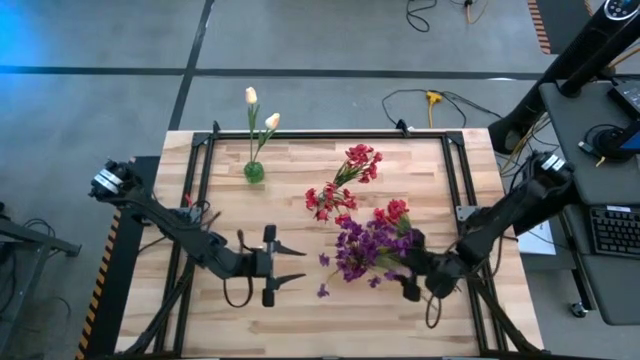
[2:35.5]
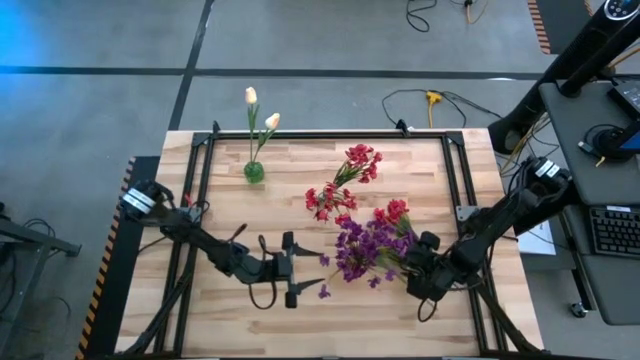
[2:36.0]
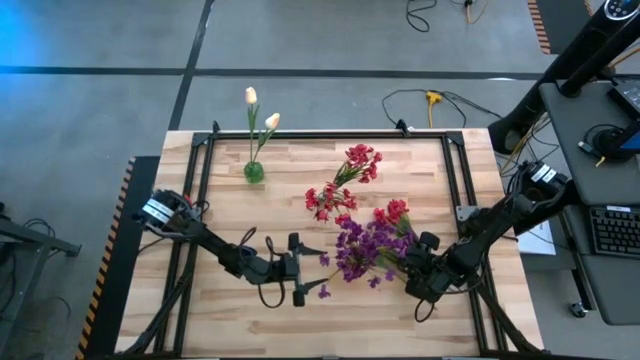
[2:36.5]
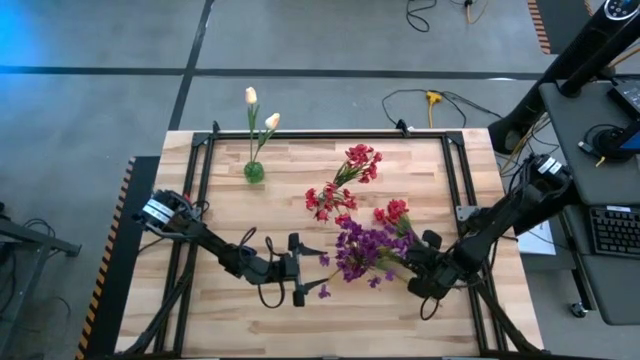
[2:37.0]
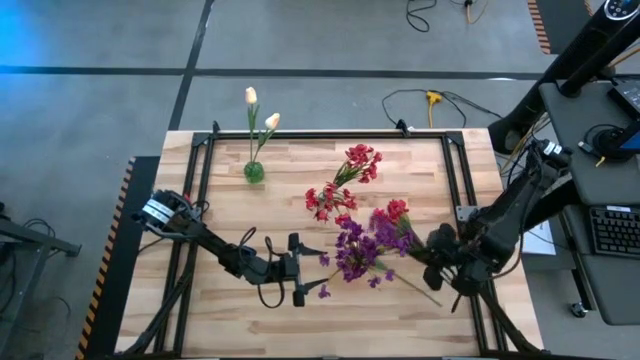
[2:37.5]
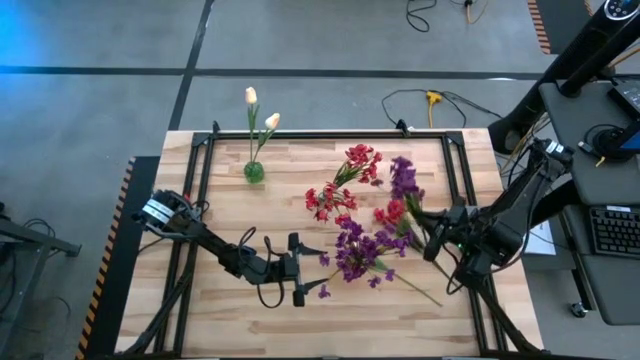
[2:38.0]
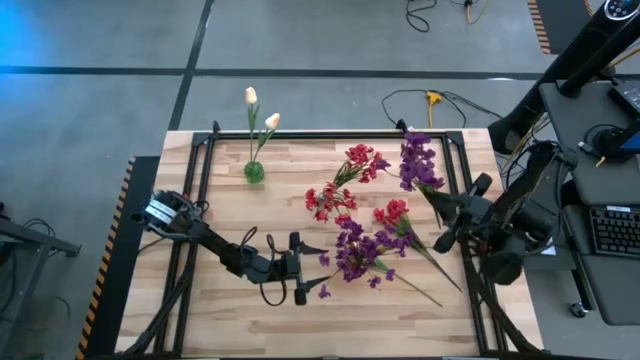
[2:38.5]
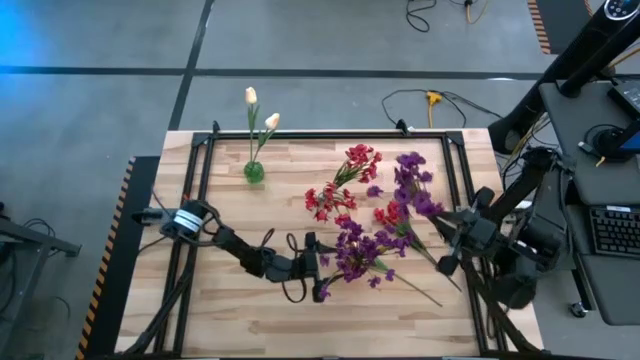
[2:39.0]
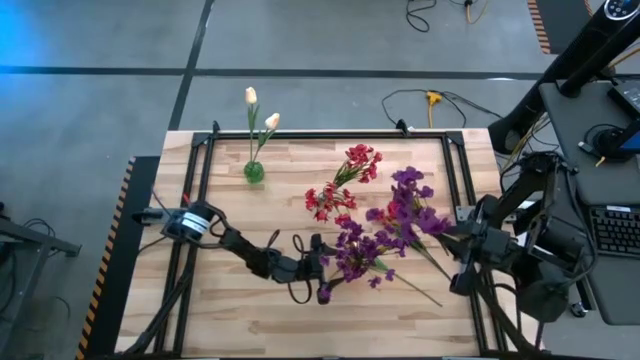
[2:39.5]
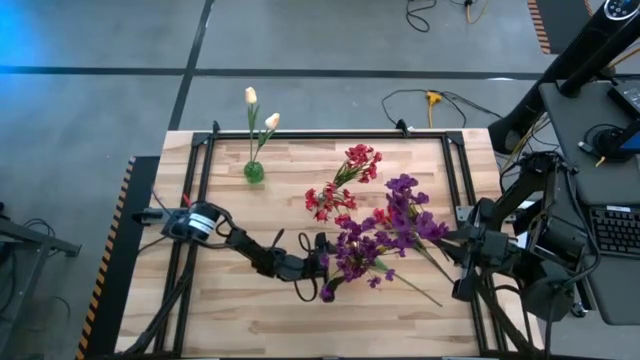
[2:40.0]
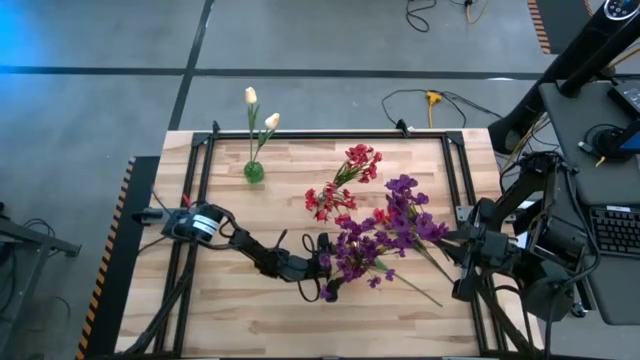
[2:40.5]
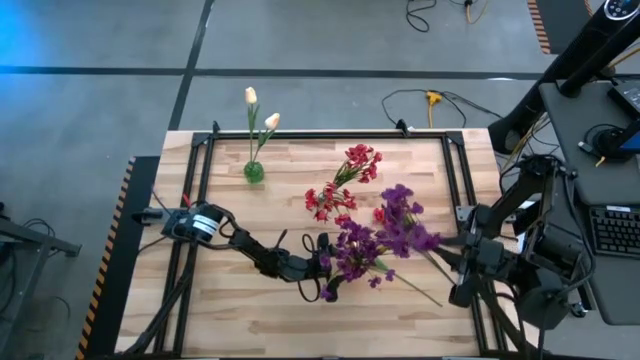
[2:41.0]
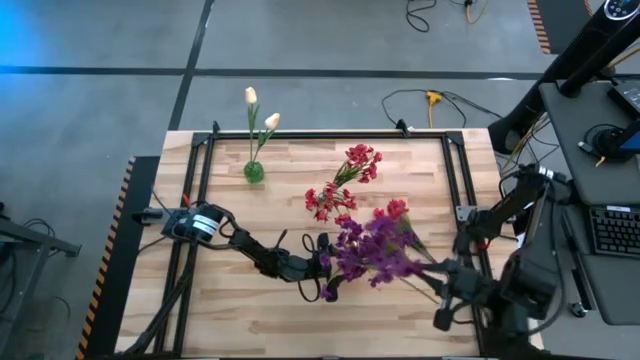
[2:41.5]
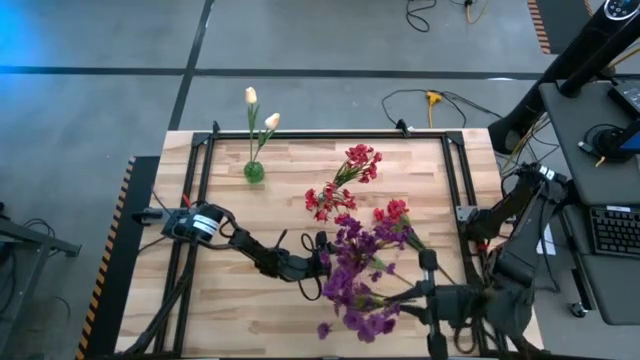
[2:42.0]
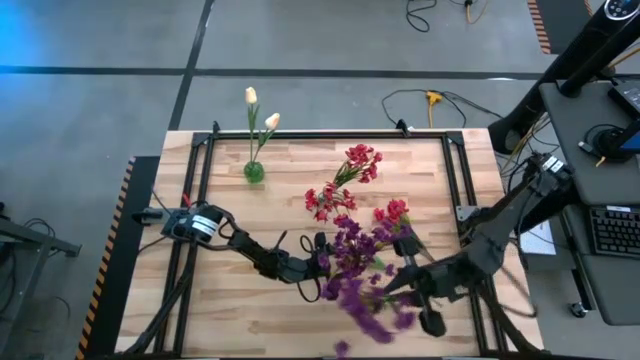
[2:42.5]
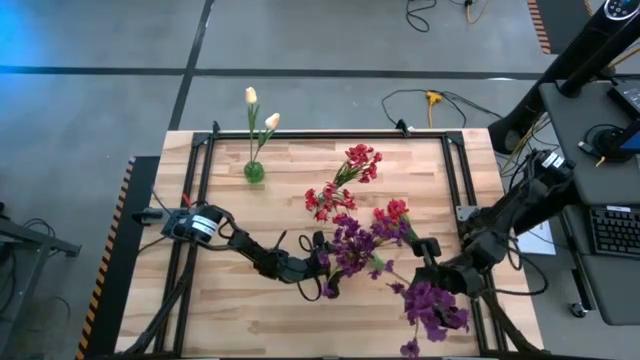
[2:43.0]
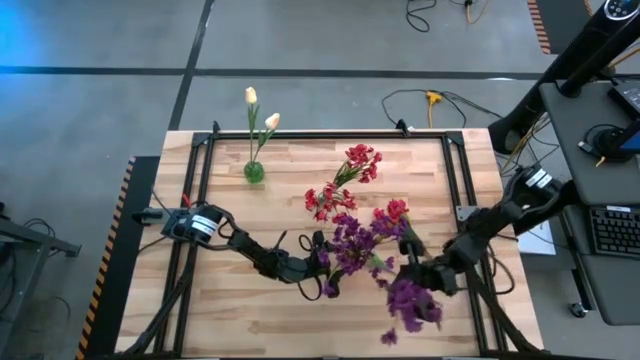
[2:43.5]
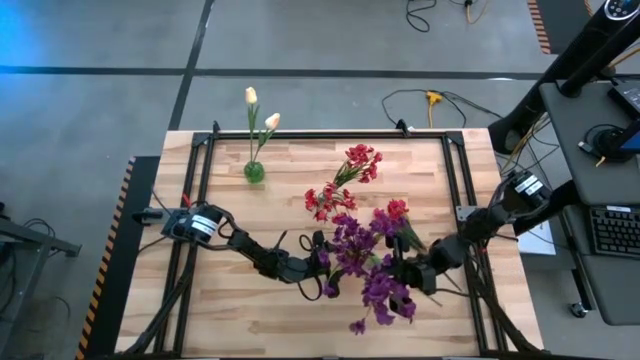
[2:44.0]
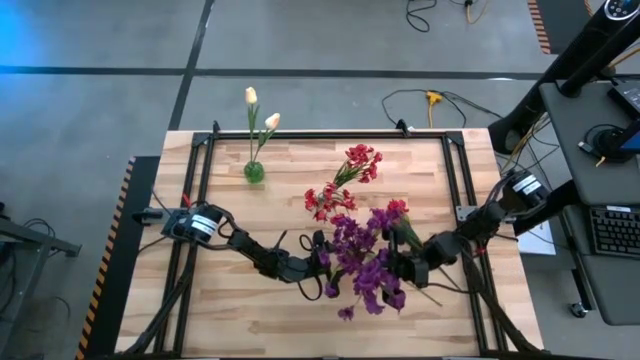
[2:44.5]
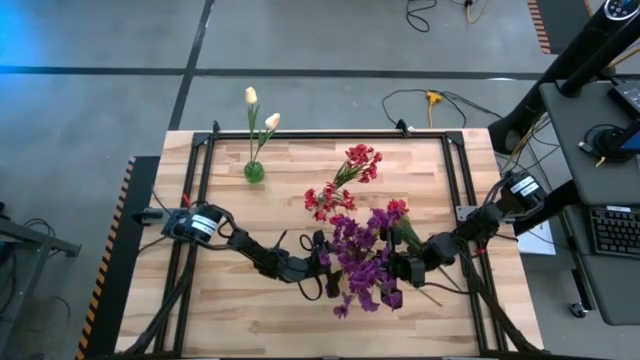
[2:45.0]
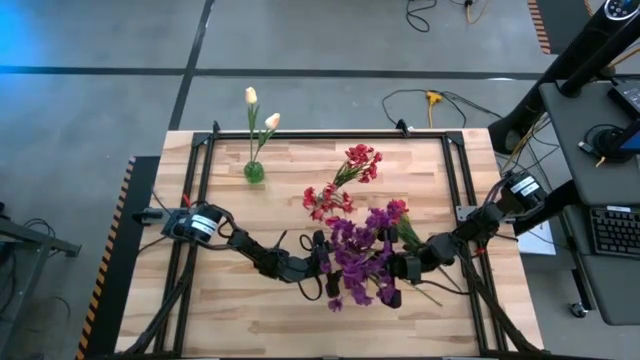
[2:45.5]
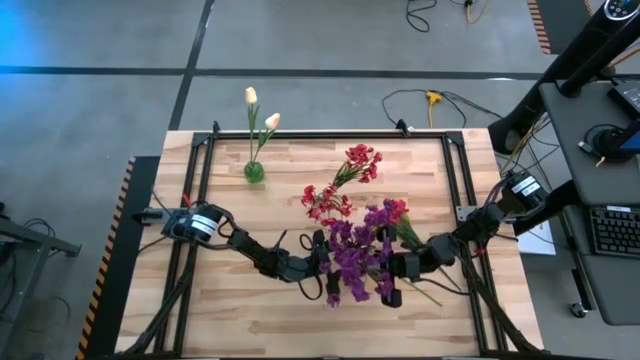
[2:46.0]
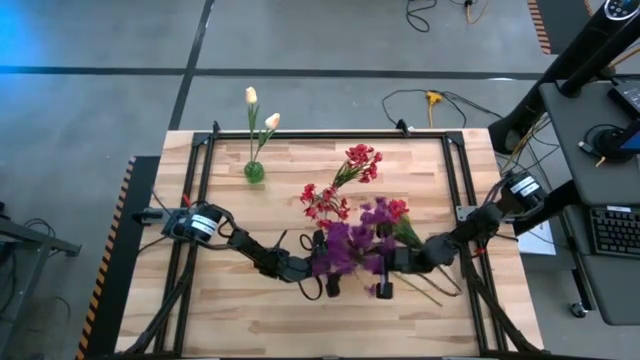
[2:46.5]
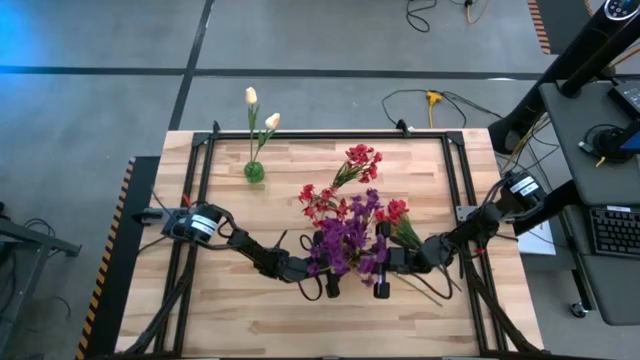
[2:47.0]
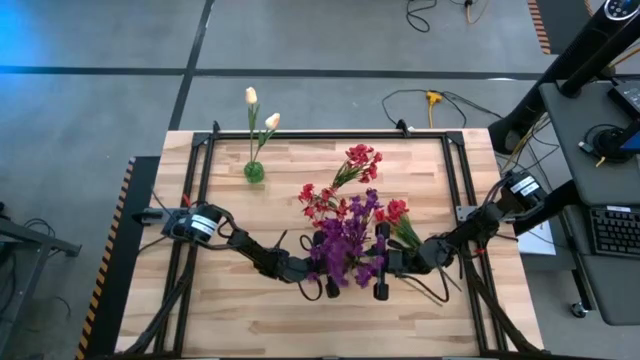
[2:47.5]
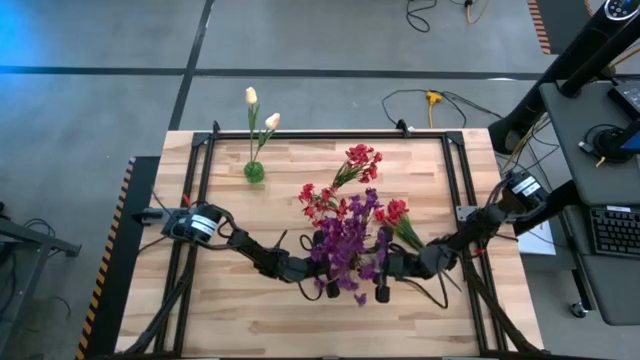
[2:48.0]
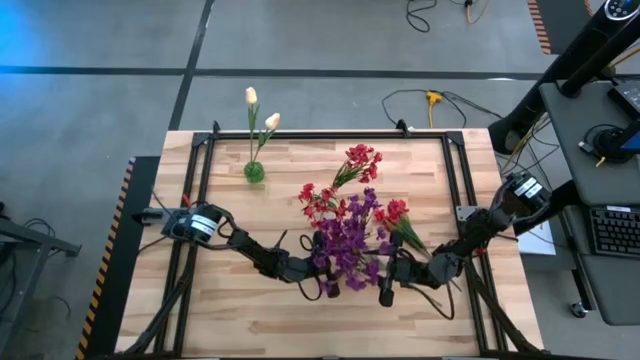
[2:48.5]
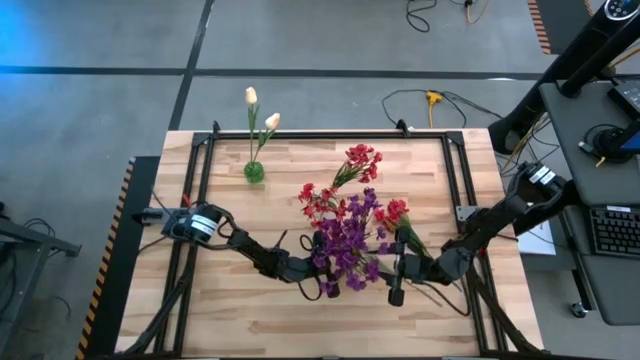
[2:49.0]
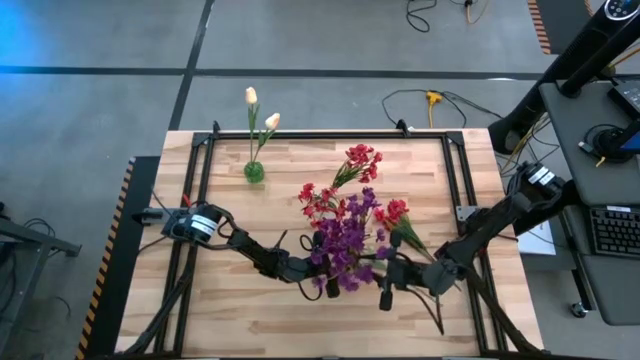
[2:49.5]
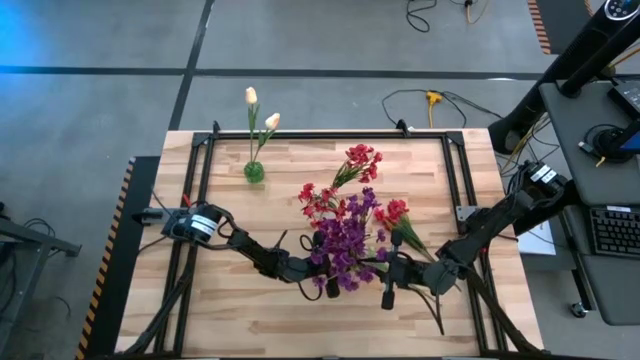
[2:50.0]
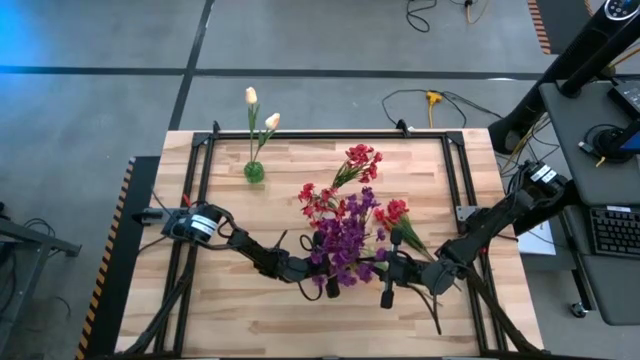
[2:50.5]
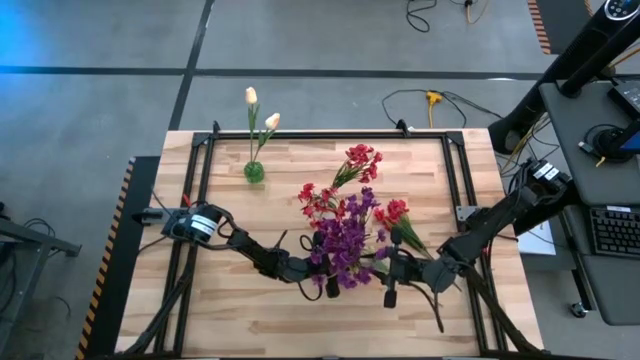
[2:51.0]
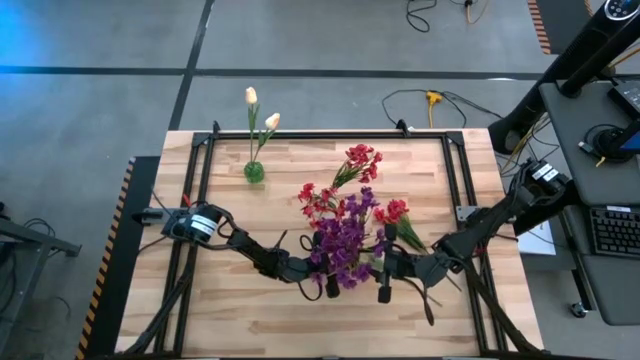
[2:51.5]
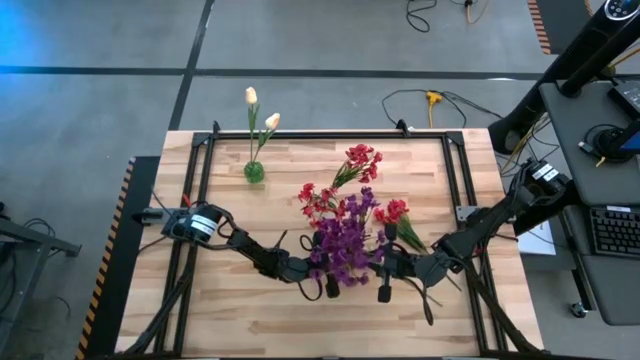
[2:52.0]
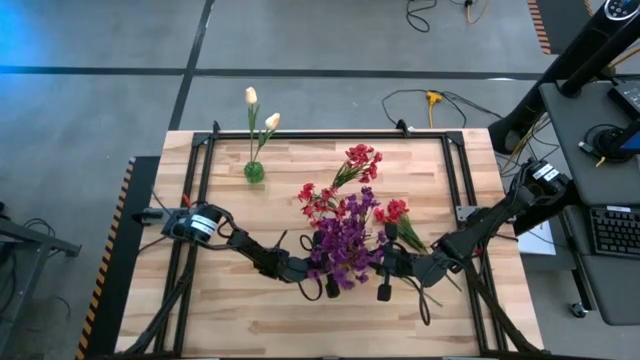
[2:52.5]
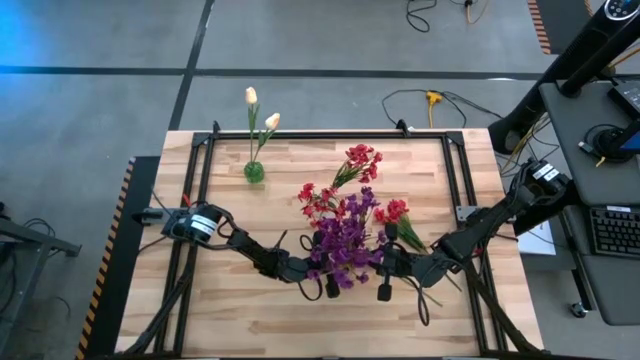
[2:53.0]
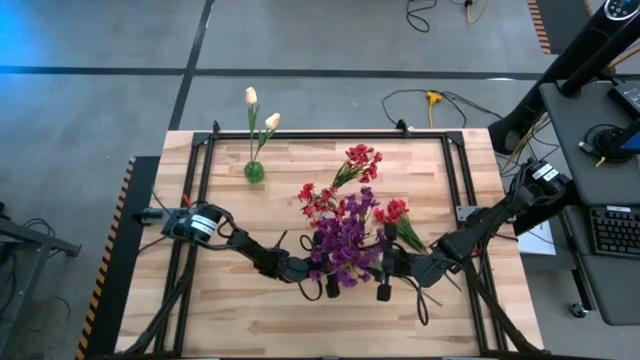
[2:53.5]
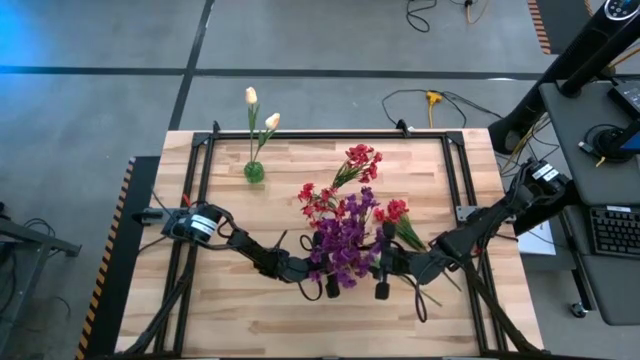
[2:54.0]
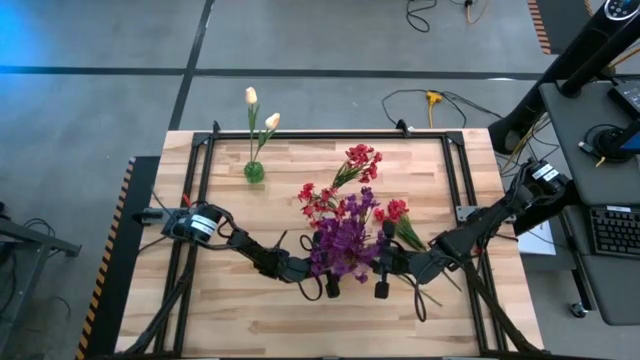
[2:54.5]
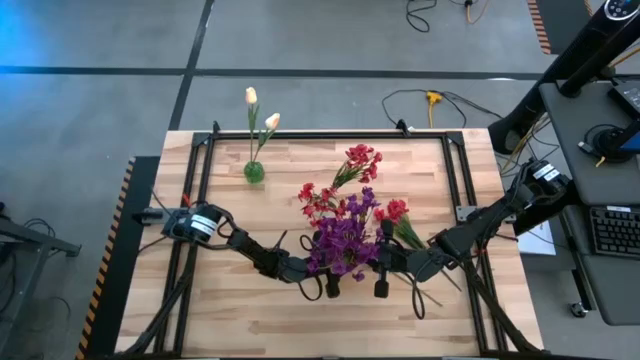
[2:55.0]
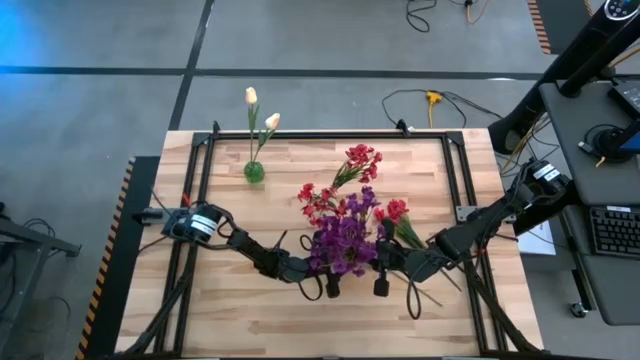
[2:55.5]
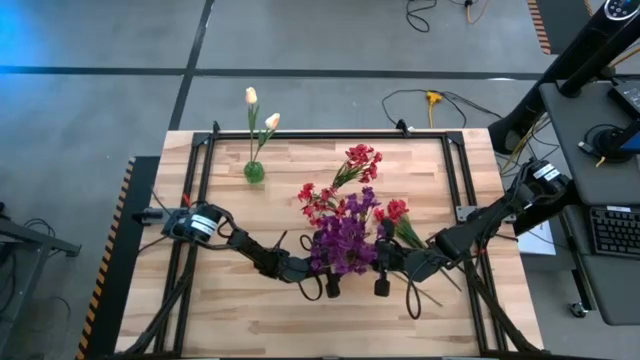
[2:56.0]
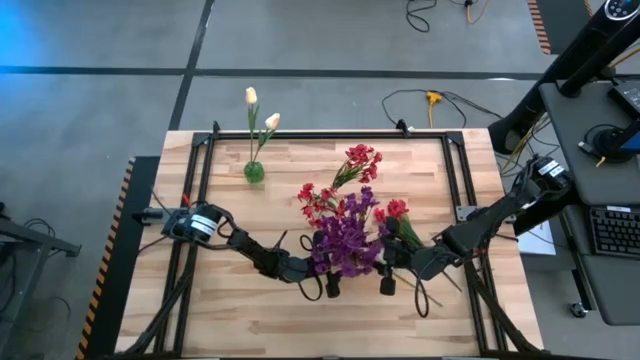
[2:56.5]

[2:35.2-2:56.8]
Task: Sort flowers into vase by color
Put the violet flowers into the red vase
